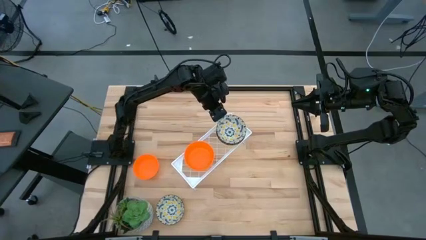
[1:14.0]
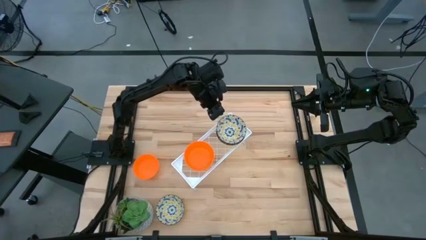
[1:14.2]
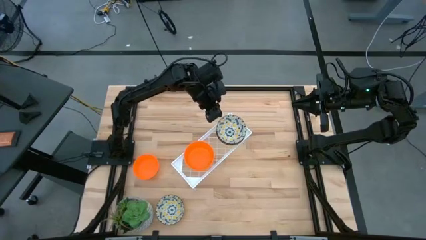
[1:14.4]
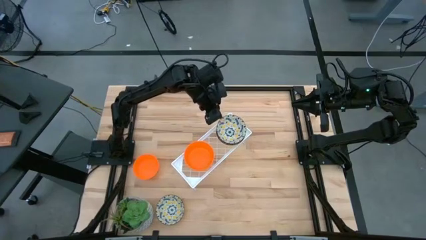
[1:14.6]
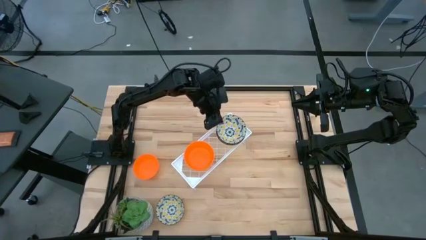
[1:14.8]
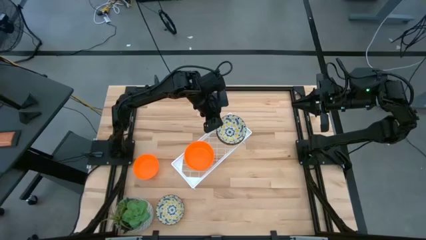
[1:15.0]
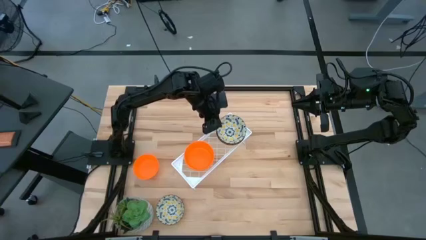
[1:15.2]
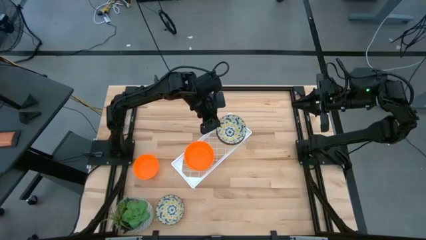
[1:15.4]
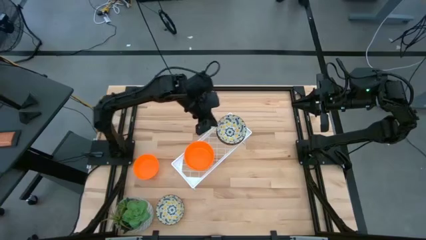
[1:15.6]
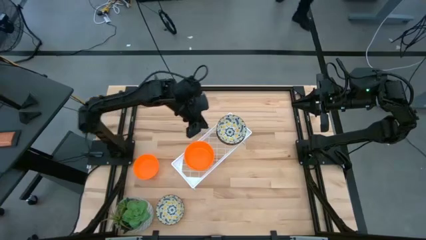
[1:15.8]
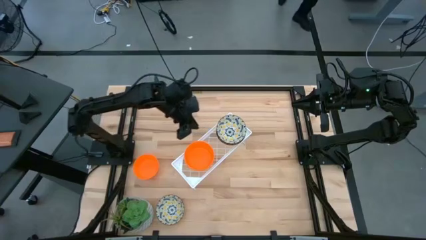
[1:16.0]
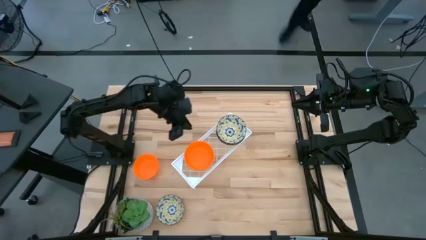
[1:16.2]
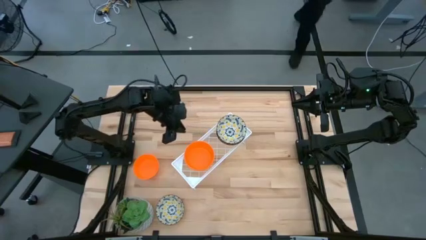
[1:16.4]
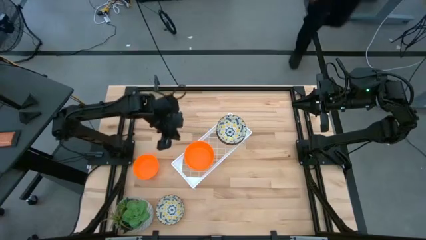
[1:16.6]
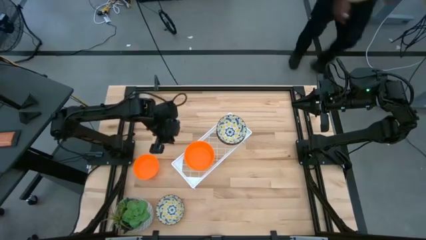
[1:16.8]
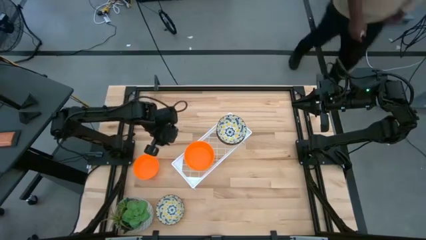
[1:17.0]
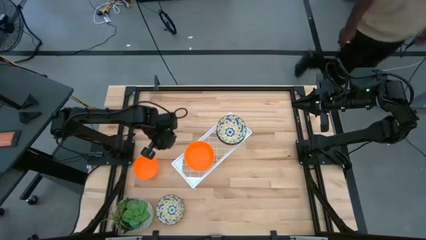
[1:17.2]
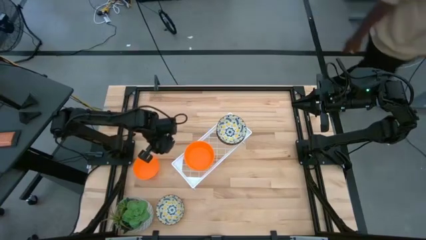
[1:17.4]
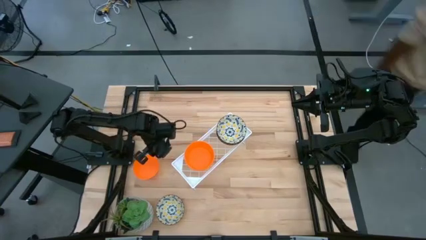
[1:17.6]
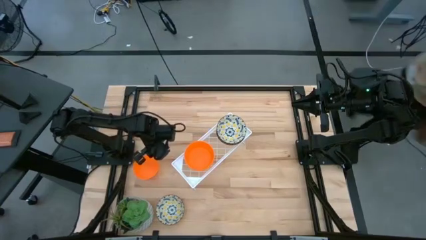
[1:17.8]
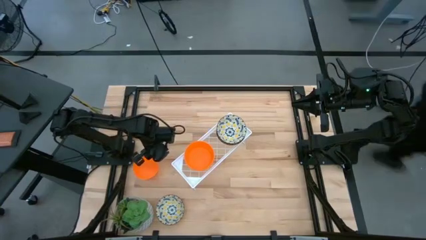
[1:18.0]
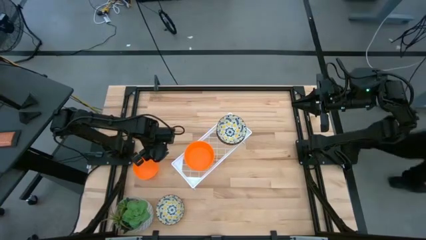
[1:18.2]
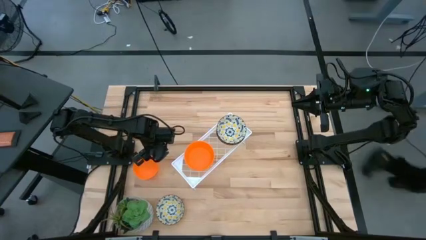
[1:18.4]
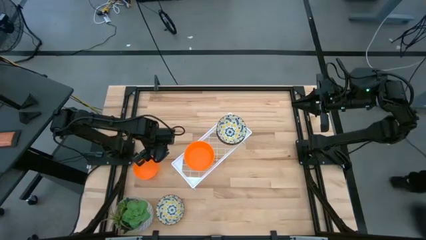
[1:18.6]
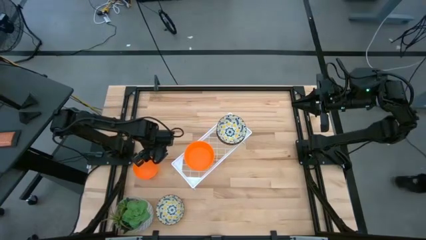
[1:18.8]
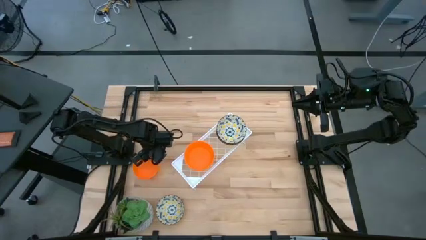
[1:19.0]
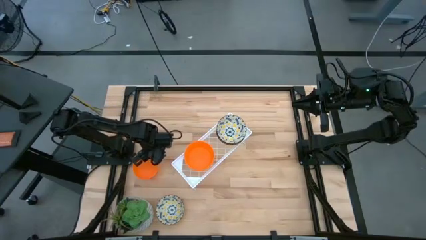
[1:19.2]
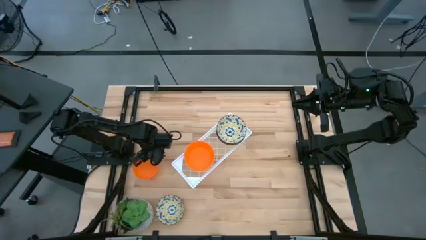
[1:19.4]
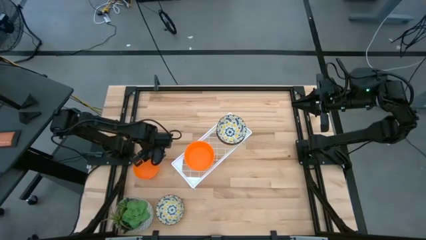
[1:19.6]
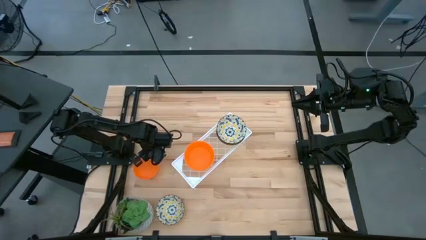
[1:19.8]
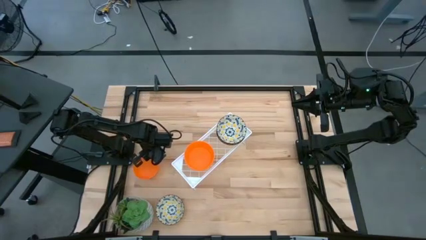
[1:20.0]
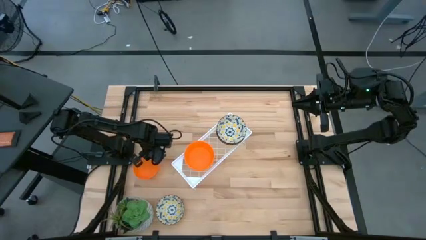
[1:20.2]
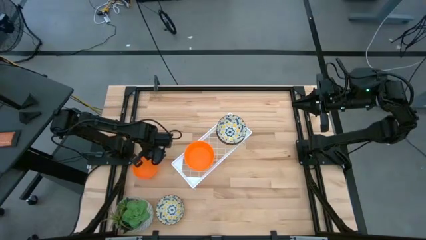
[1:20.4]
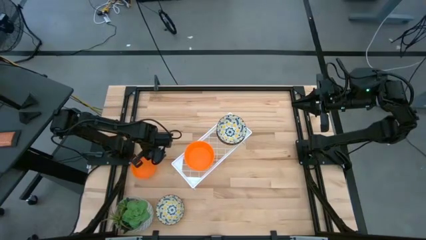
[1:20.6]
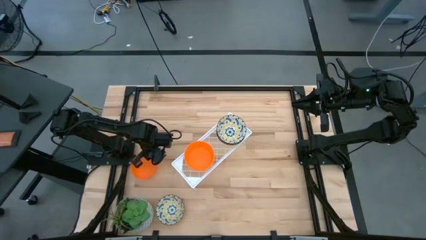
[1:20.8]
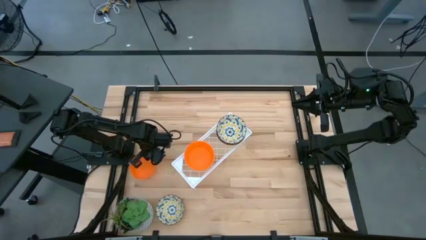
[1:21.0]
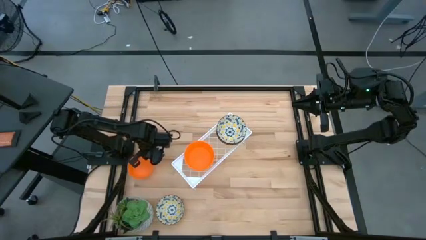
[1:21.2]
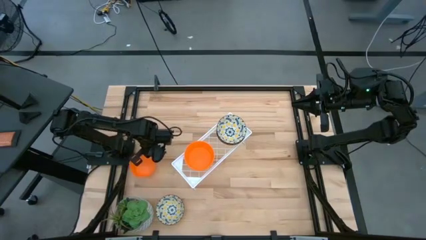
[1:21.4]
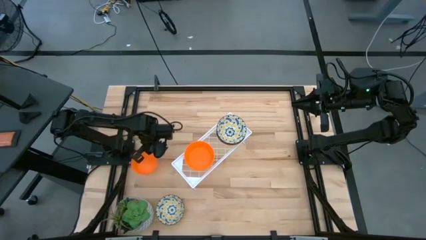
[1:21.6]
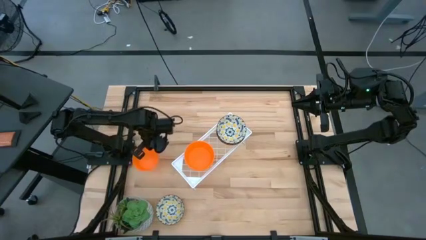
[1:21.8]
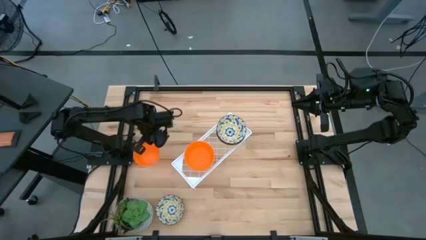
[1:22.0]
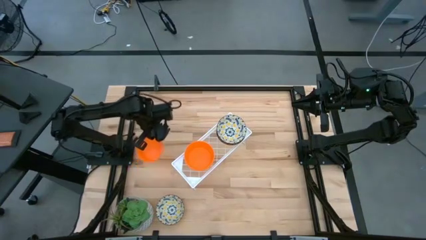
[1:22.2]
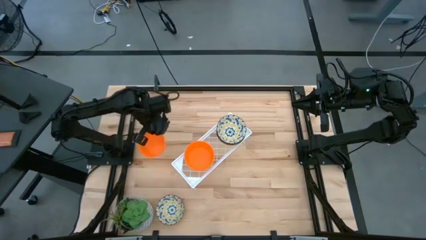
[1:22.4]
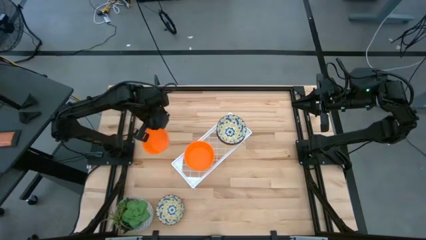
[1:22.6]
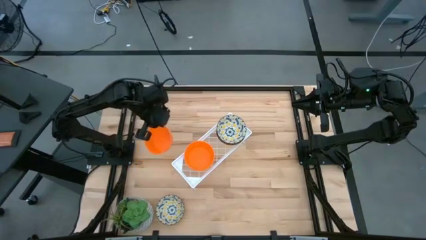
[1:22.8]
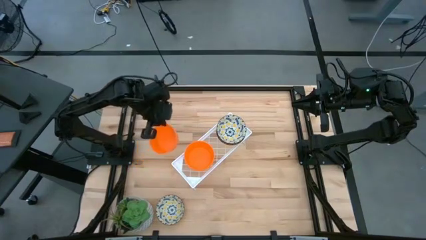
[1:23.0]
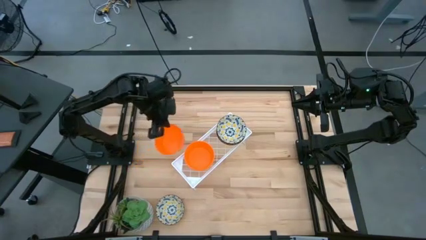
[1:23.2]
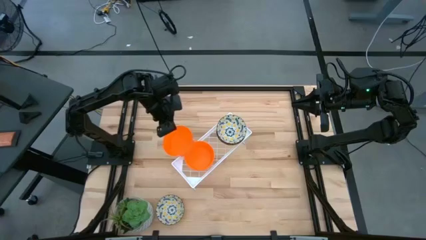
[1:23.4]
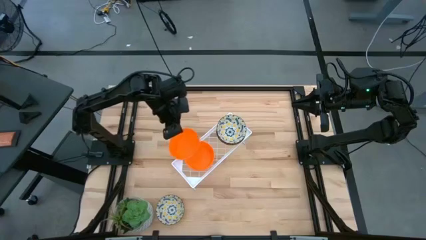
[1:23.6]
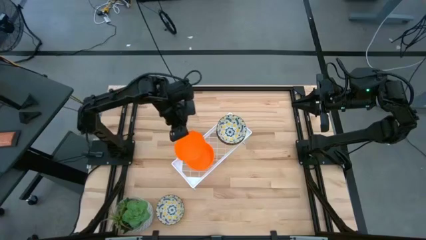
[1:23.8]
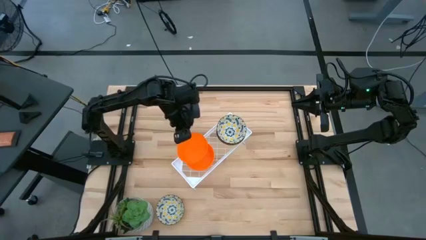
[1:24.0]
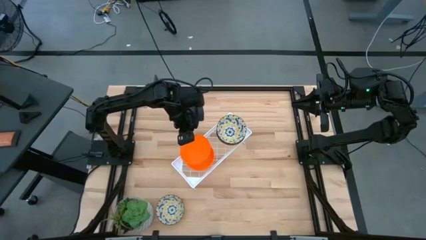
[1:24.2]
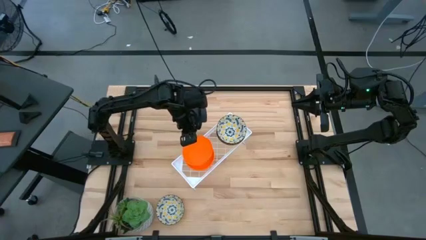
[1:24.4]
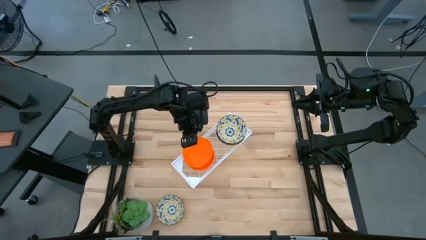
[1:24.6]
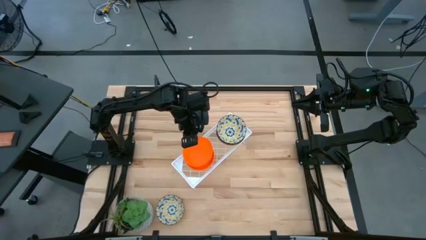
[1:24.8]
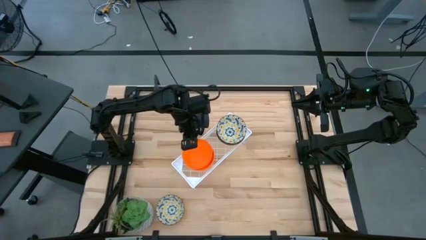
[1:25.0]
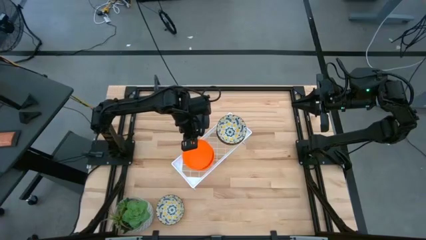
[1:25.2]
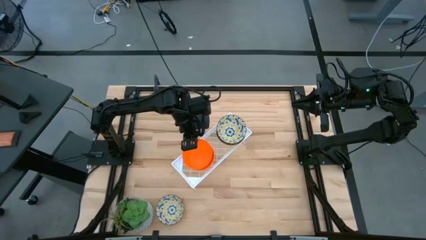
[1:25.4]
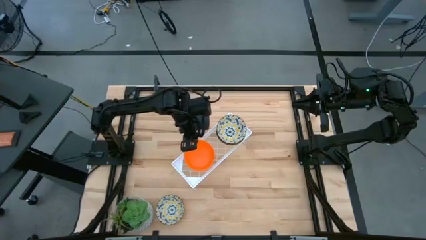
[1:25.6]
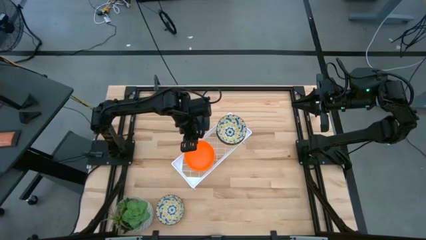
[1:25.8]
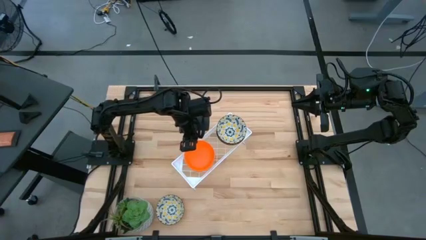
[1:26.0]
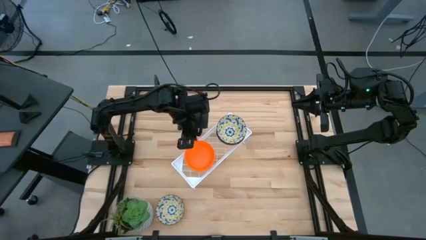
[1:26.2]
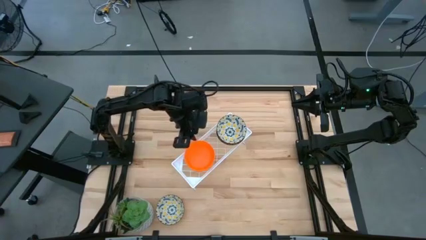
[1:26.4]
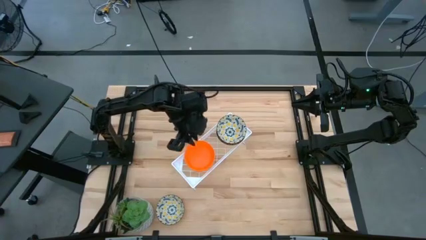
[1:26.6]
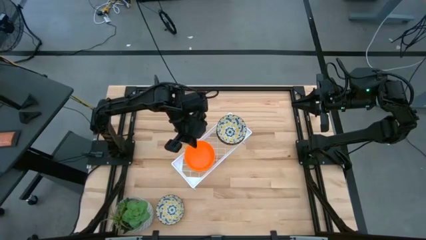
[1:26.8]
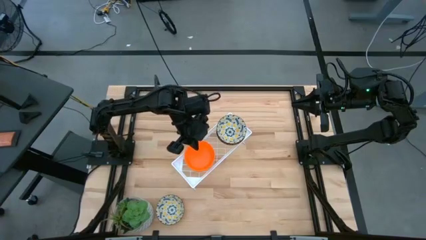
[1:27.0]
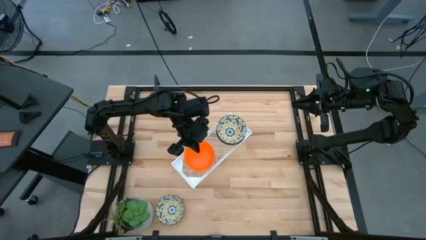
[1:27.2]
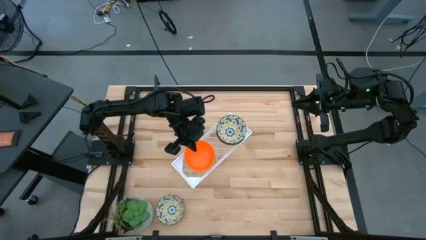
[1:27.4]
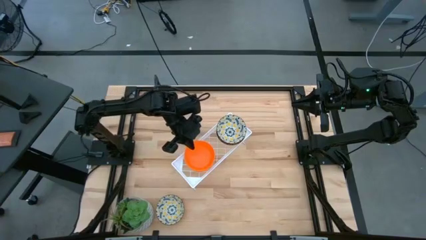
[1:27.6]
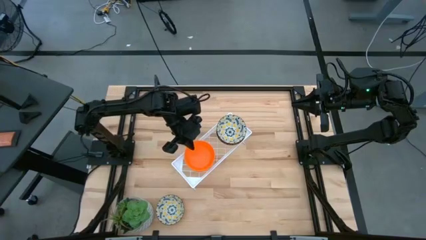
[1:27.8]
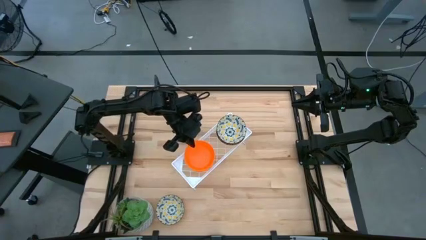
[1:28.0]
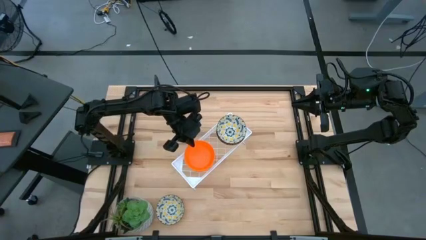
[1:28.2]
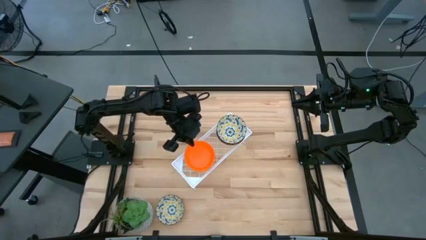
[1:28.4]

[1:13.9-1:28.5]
Task: Pick & Place Mini bowls
Stack the orange bowl on top of the orange bowl on the shelf

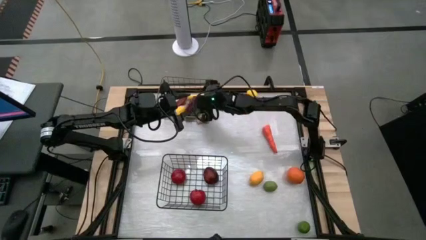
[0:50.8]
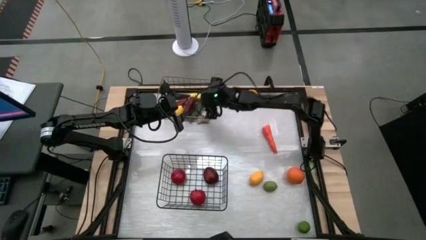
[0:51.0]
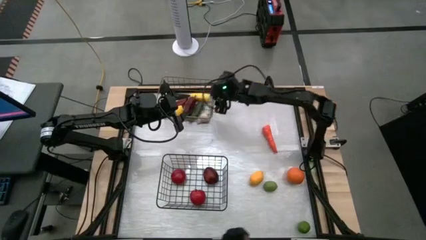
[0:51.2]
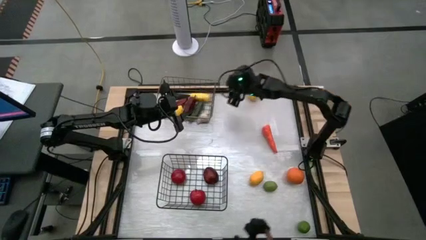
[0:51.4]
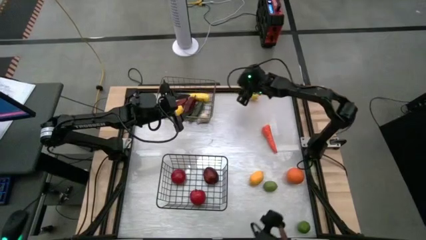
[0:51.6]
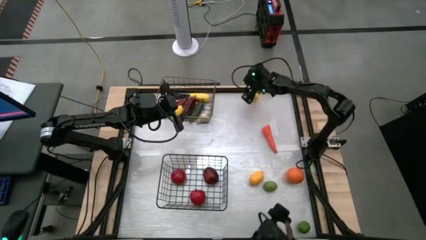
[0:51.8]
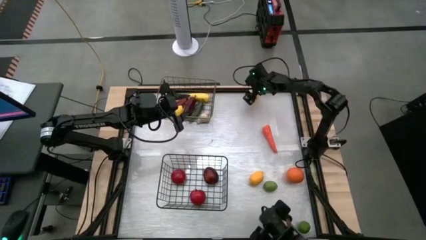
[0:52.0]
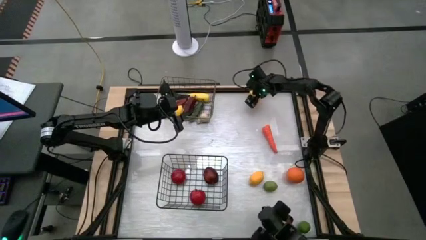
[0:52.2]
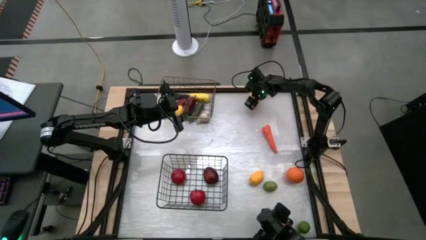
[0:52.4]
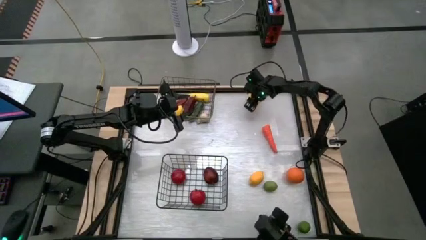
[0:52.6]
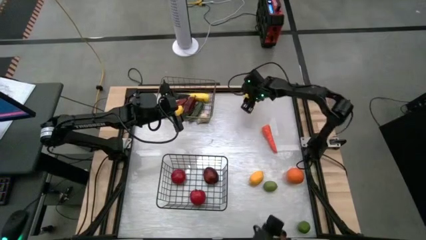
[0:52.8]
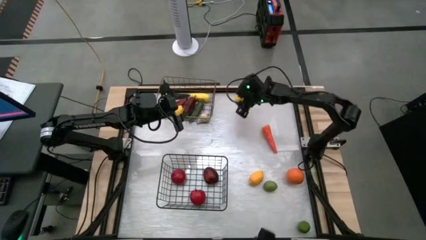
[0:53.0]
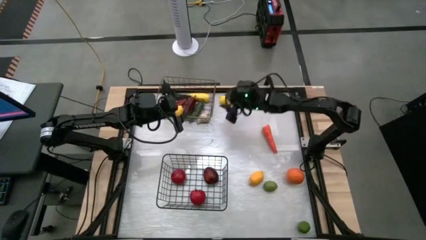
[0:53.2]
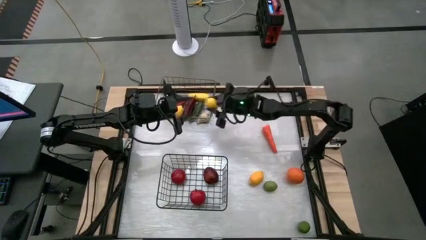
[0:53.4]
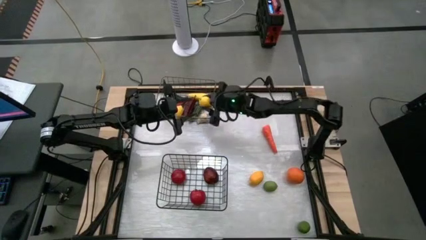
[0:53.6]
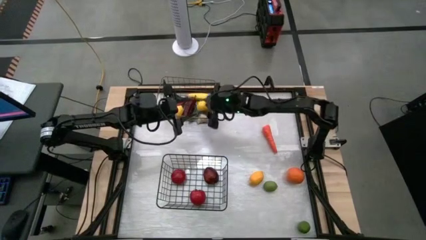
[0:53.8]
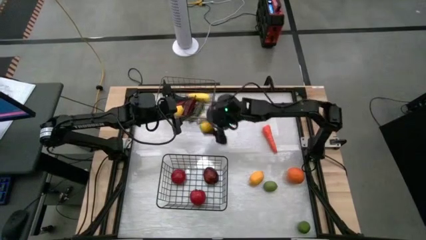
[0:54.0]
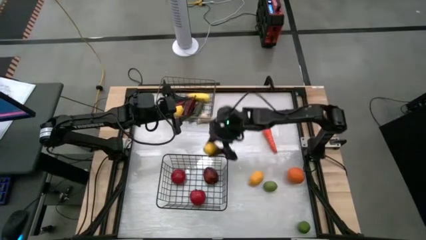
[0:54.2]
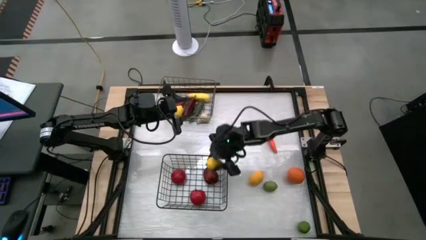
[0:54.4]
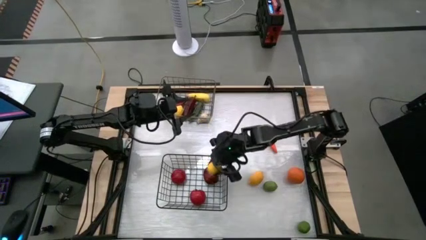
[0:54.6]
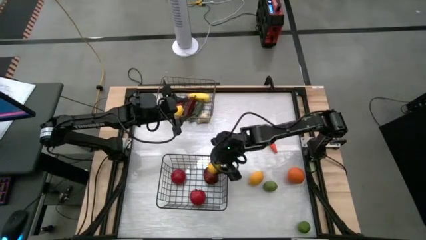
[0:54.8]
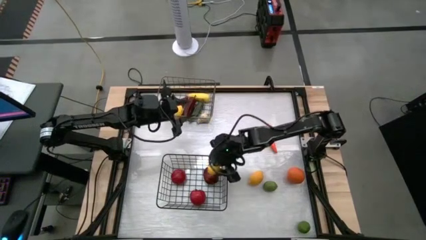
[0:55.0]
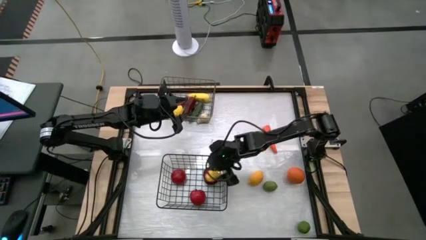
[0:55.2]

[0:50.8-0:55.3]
Task: Sort produce into baskets
Put the yellow lemon into the bottom wire basket
